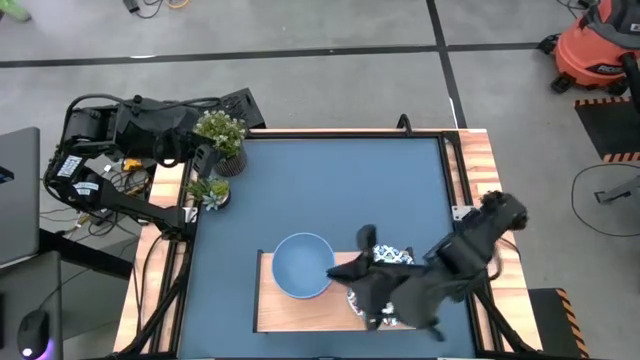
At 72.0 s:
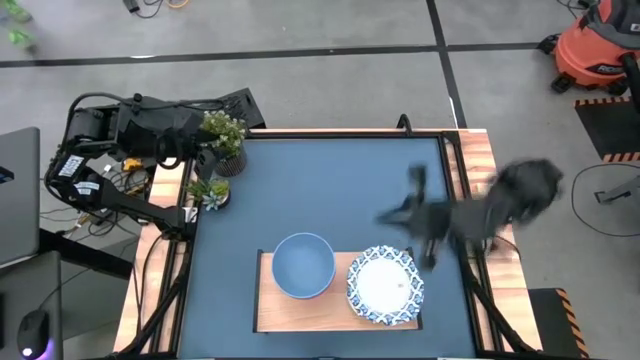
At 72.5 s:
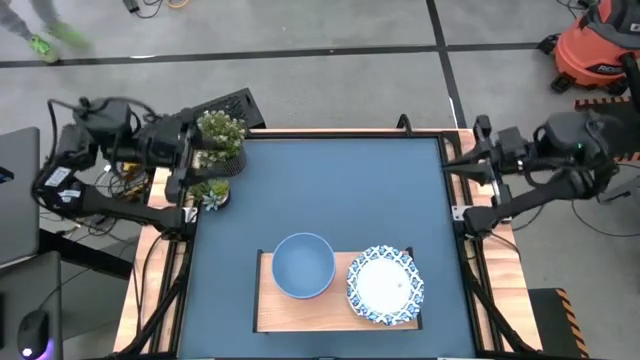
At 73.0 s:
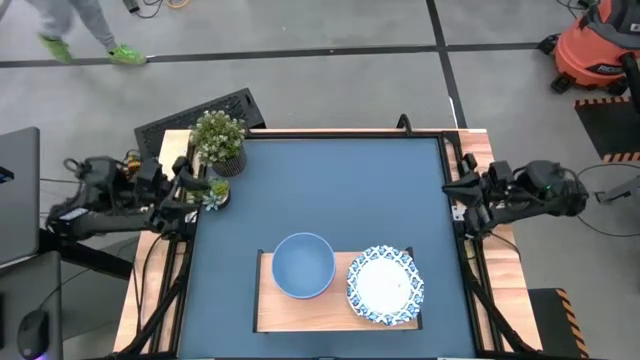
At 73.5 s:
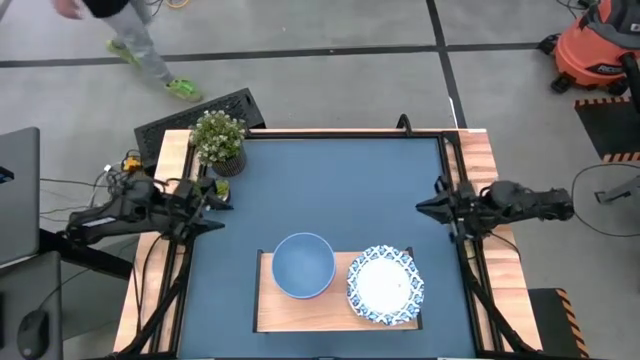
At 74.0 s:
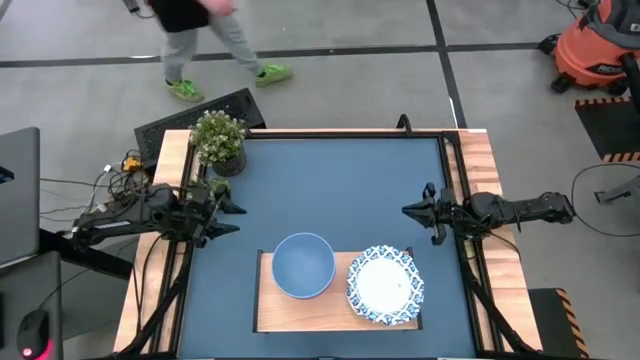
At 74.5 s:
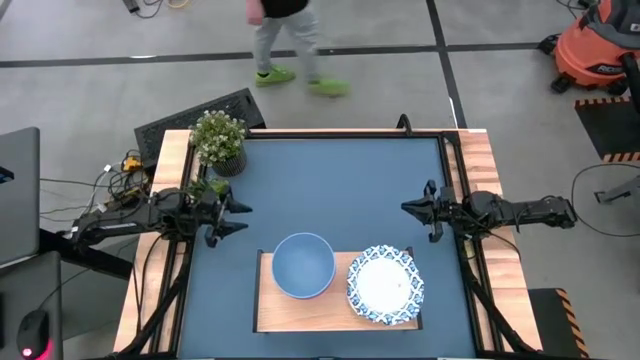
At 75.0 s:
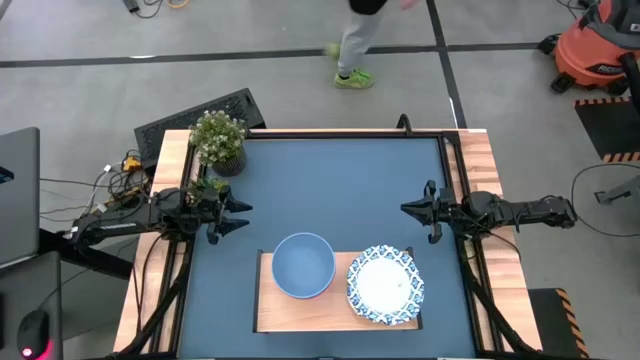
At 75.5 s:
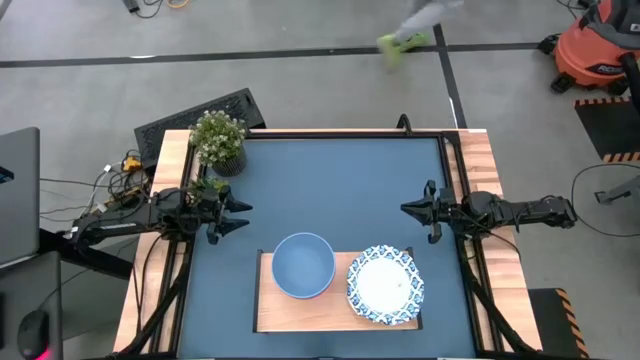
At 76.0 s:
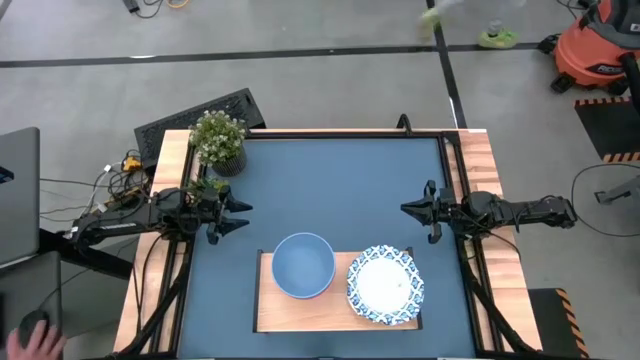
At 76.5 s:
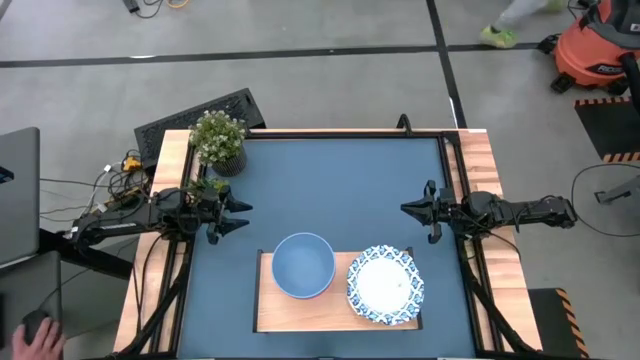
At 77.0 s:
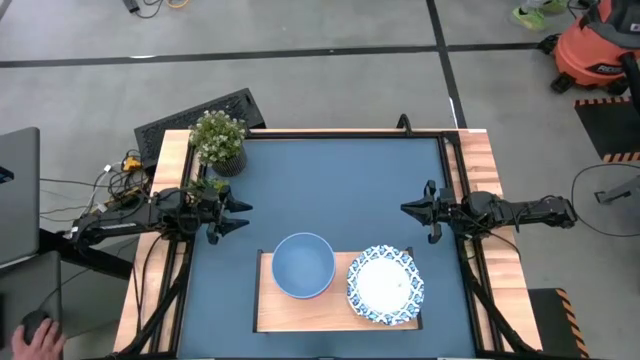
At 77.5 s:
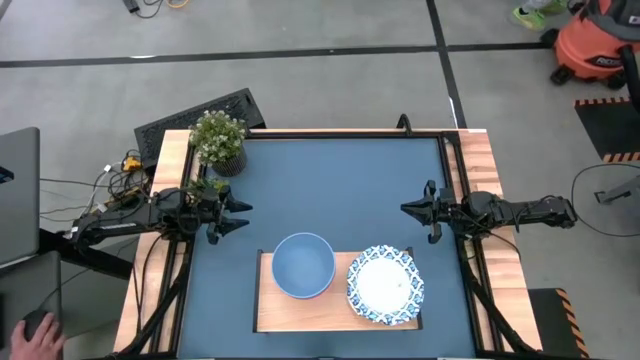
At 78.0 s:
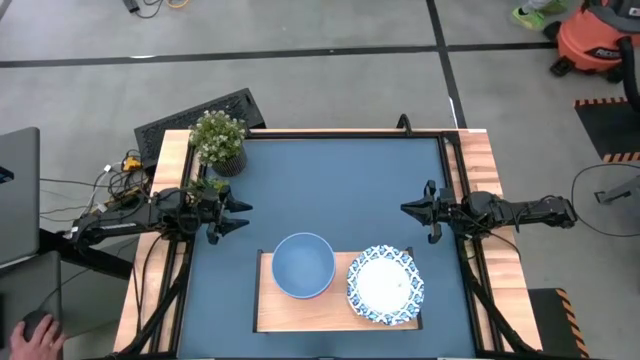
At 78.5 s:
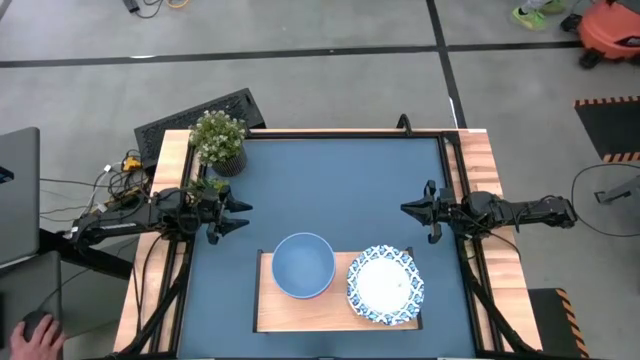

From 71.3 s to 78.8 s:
Task: Place and stack bowls onto a shelf
Return to Home Position

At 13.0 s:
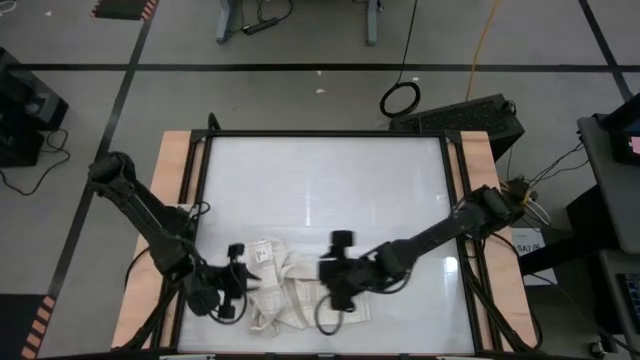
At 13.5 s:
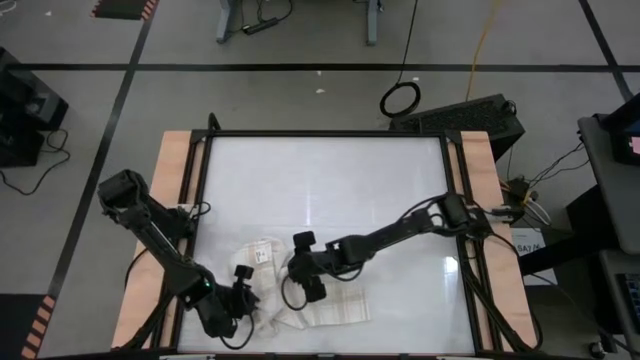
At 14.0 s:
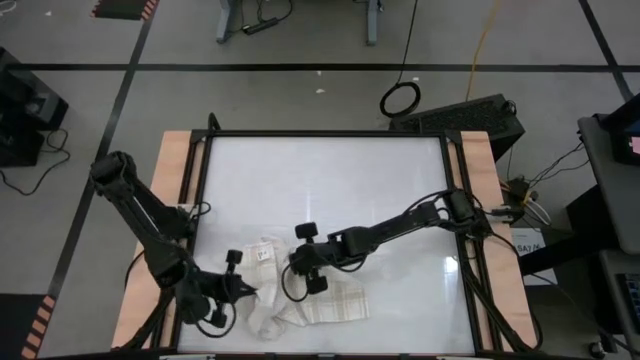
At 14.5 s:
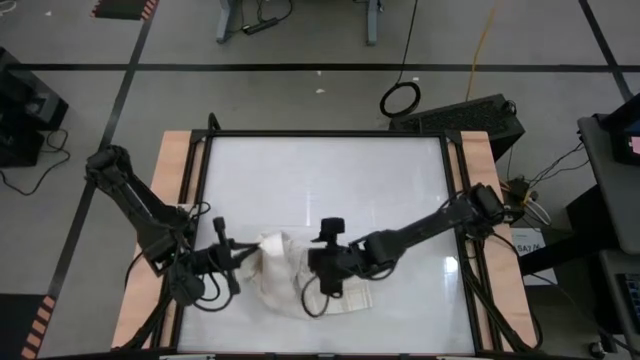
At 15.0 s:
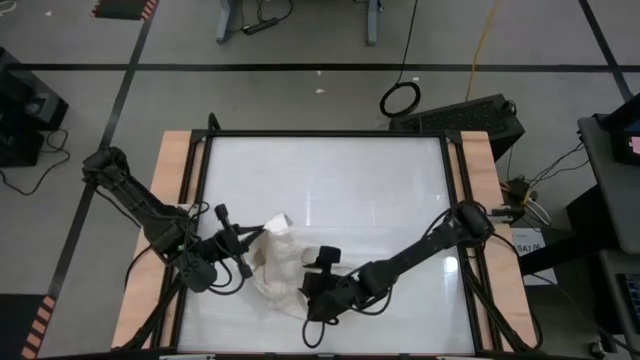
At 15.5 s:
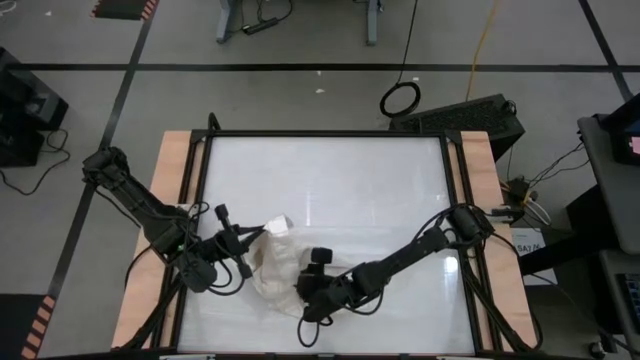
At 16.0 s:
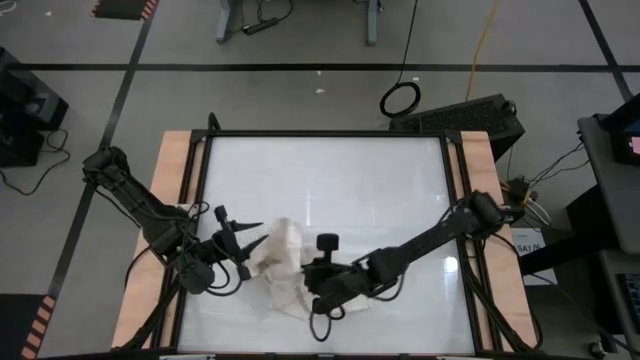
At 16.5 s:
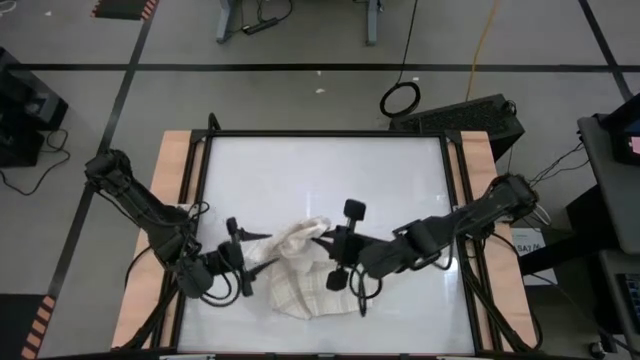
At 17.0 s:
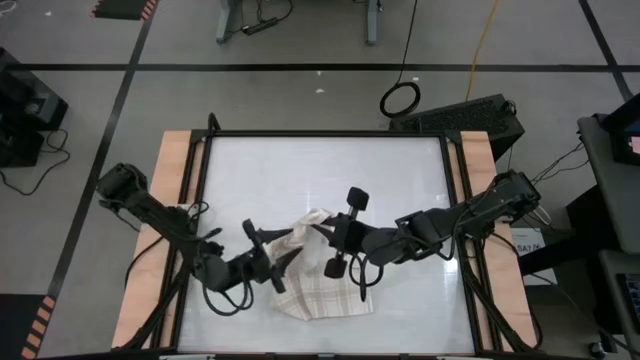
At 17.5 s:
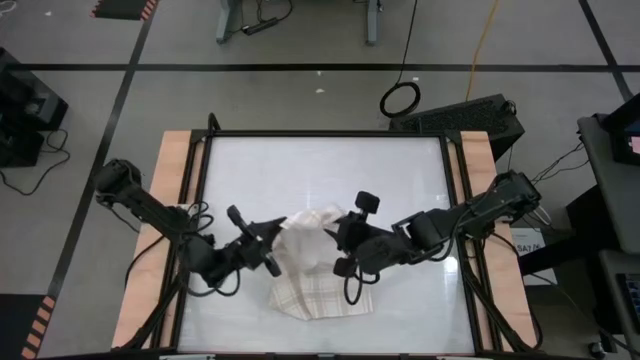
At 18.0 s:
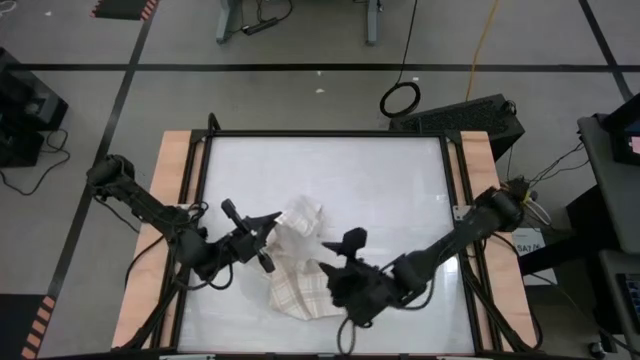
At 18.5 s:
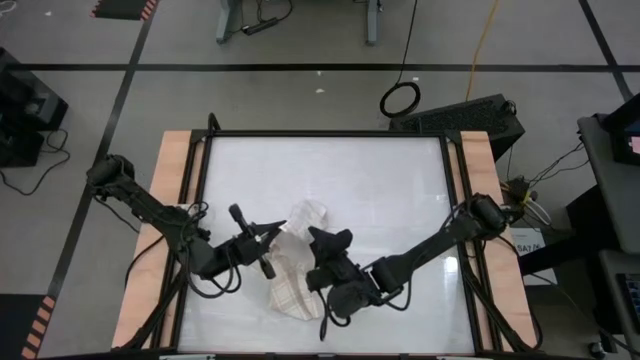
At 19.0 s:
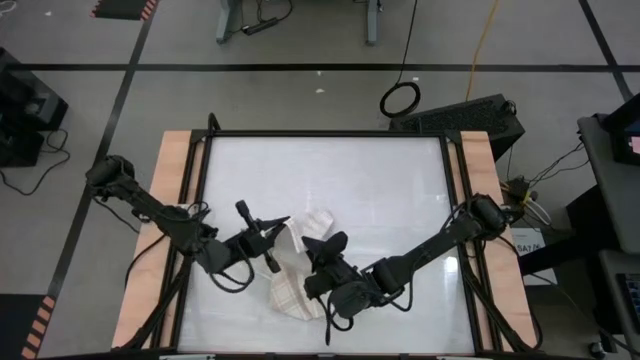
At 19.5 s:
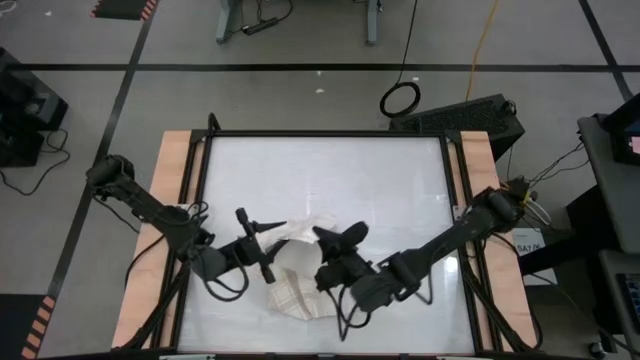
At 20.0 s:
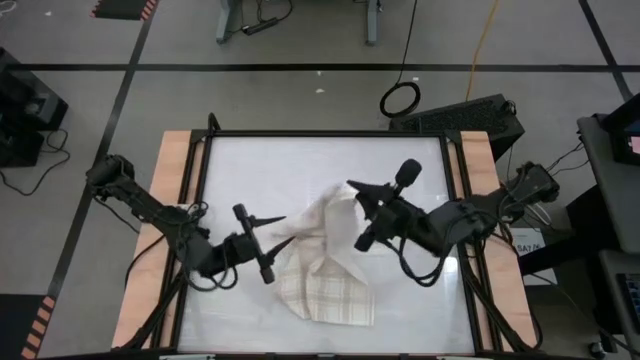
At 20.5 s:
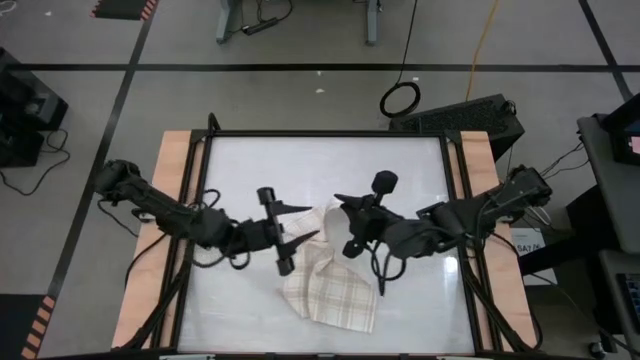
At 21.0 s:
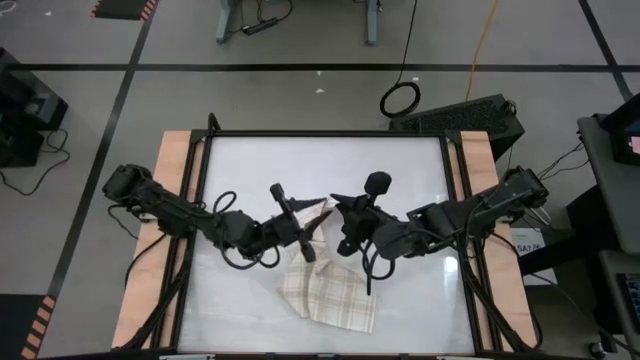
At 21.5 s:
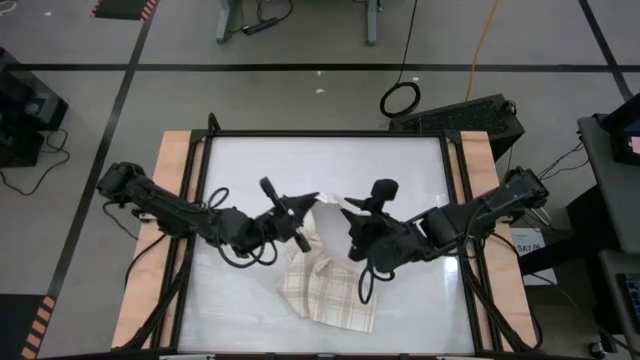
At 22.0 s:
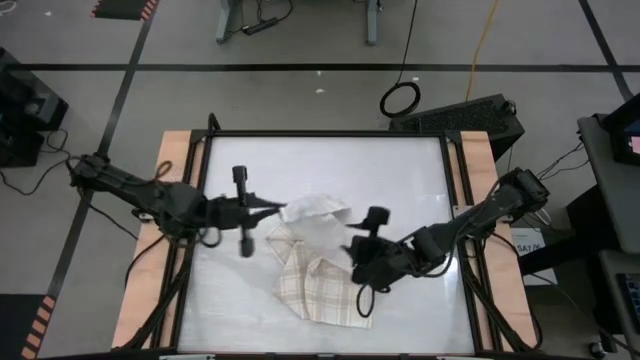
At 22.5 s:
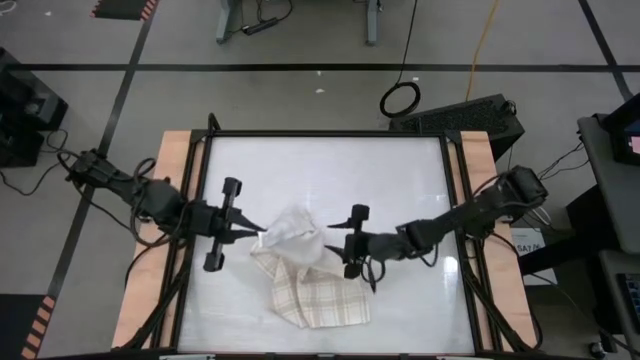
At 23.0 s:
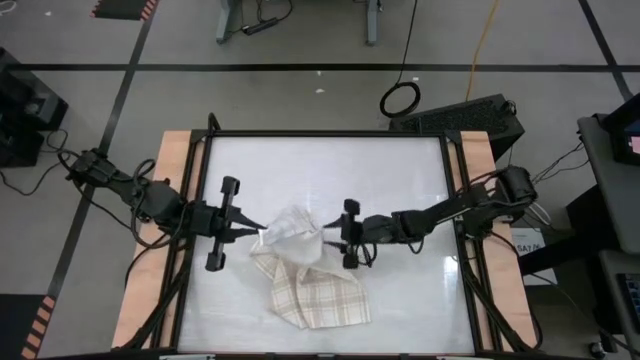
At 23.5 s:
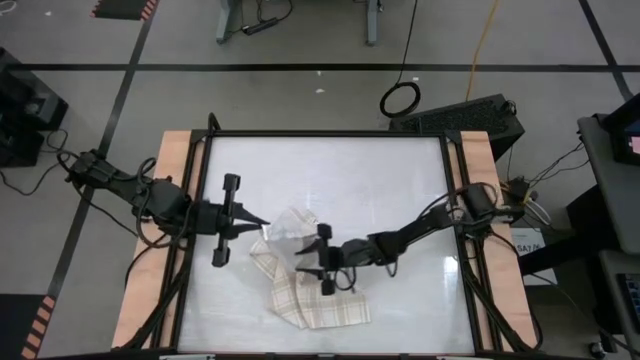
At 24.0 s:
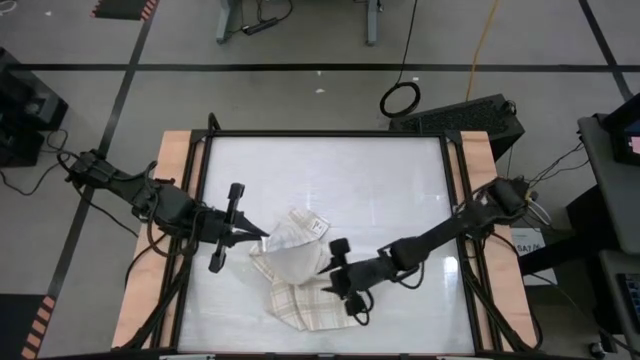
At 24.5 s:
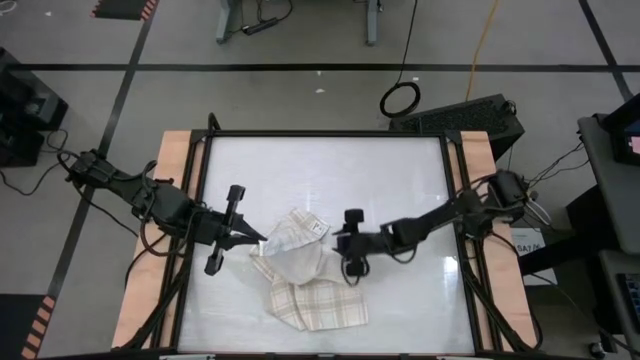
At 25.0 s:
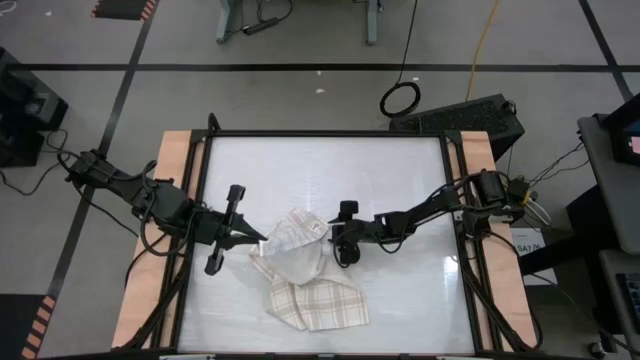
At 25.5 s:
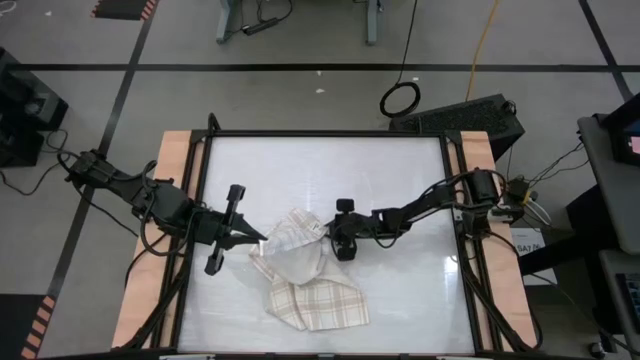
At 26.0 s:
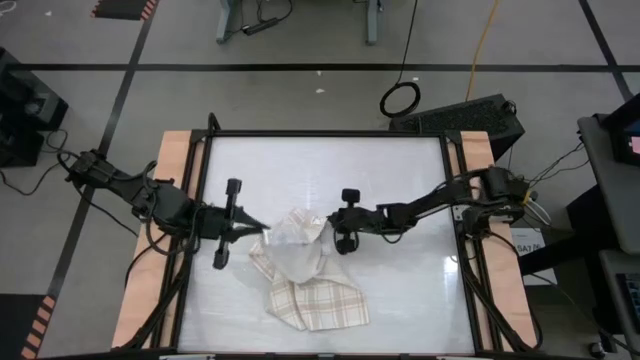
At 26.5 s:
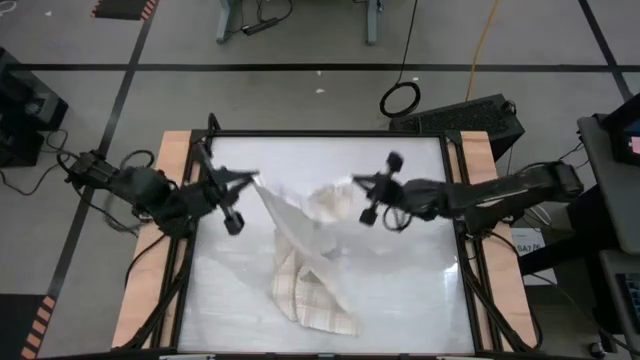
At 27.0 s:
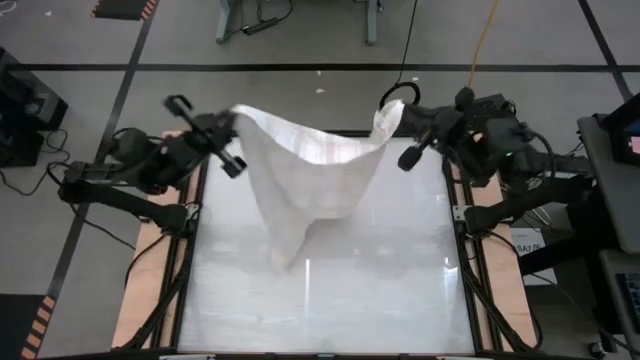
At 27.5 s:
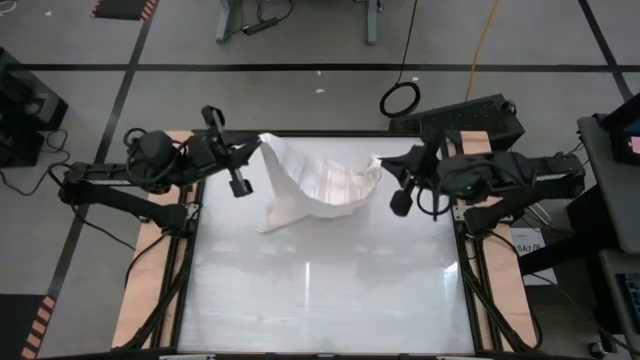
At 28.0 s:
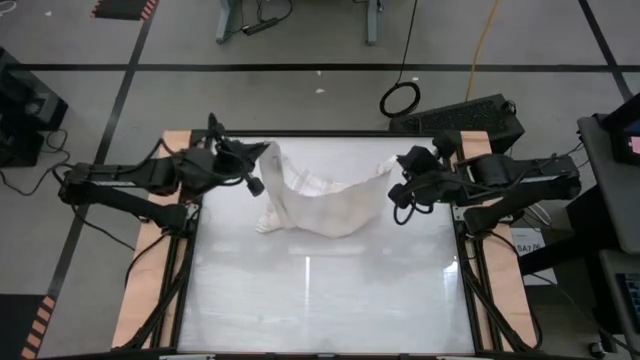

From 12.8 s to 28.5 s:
Task: Roll towel
Roll the white-brown patterned towel
